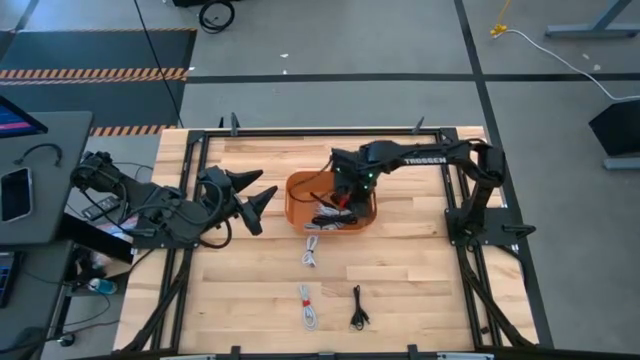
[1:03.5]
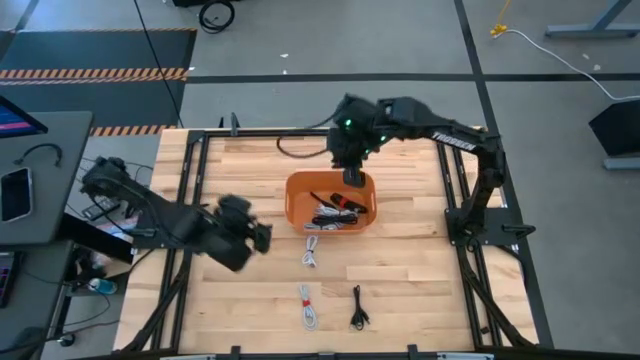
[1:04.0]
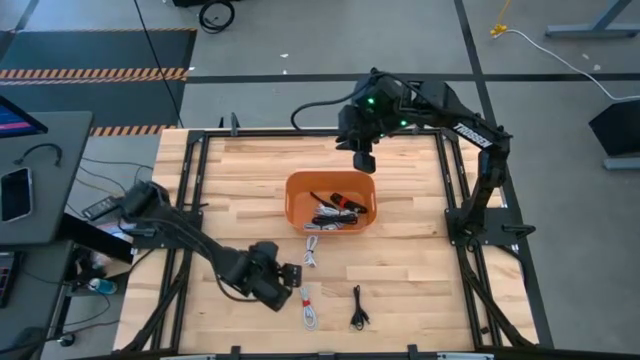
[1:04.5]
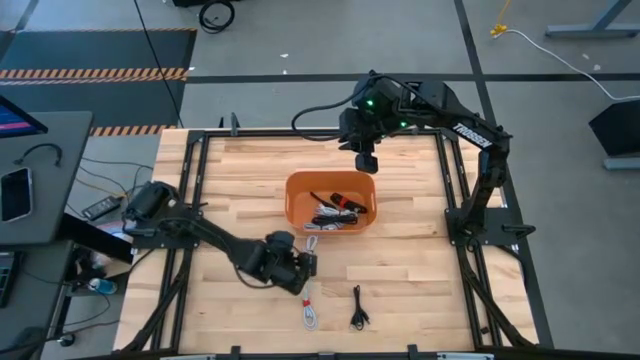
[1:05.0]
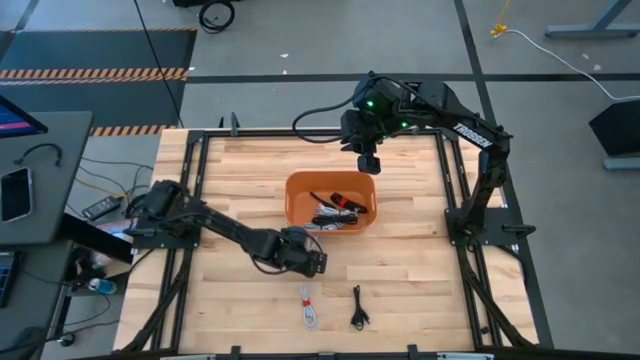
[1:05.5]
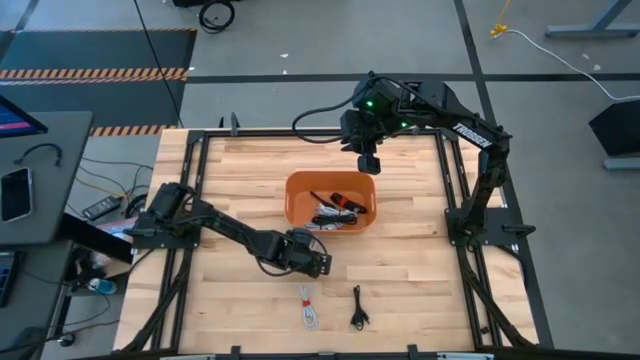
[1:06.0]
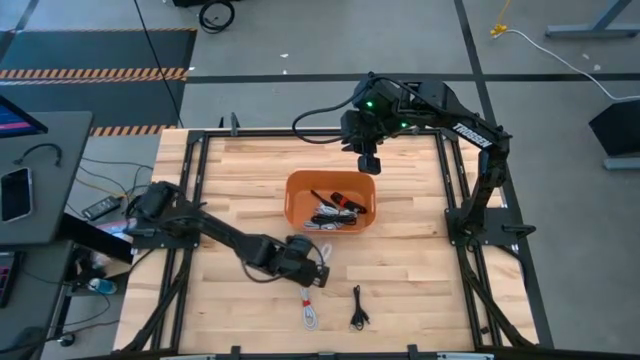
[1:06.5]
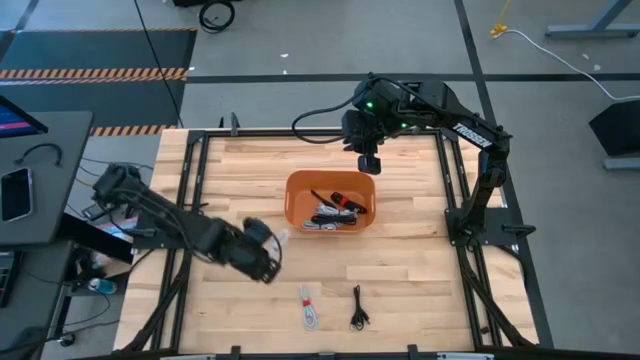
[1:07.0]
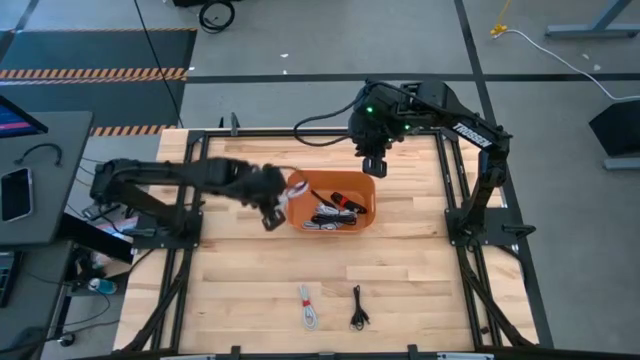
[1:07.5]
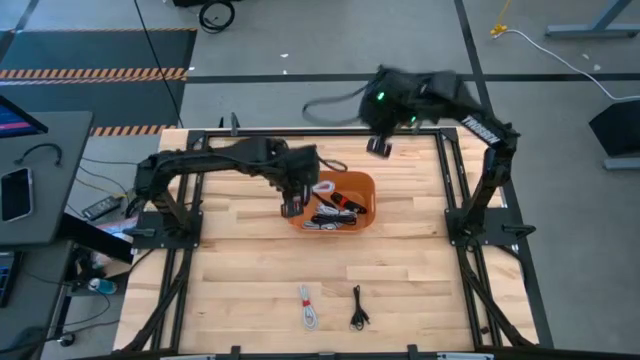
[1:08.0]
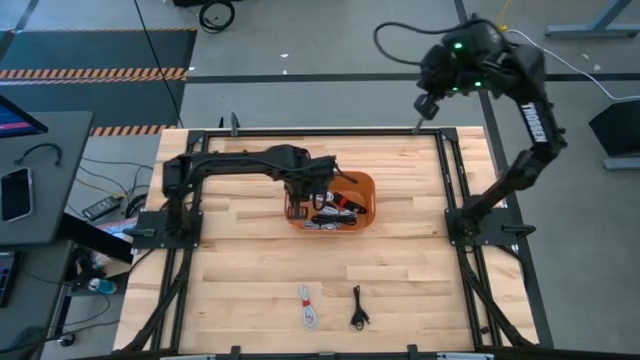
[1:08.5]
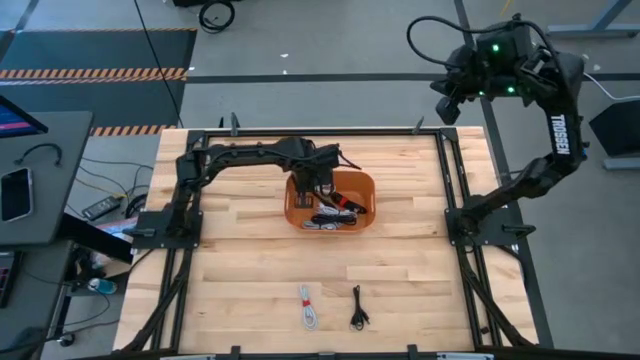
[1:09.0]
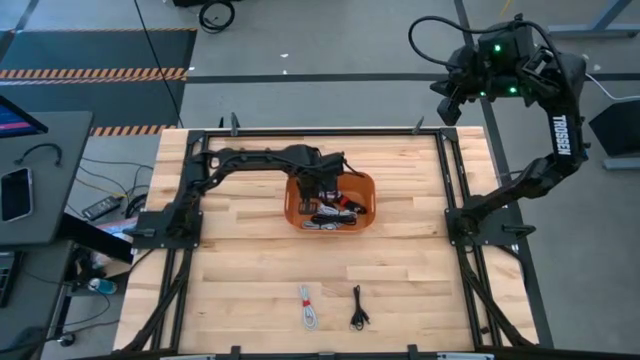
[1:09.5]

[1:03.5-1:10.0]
Task: Pick and place USB-C Cables
Put the white USB cable into the orange bin

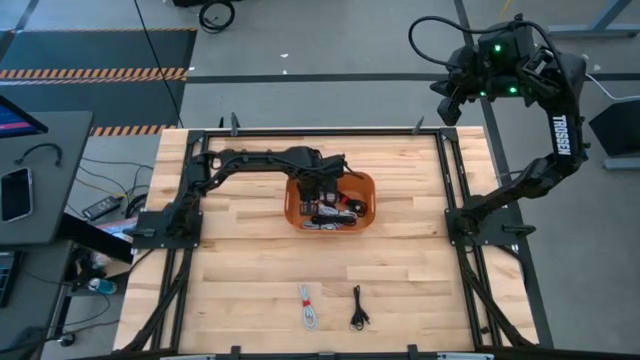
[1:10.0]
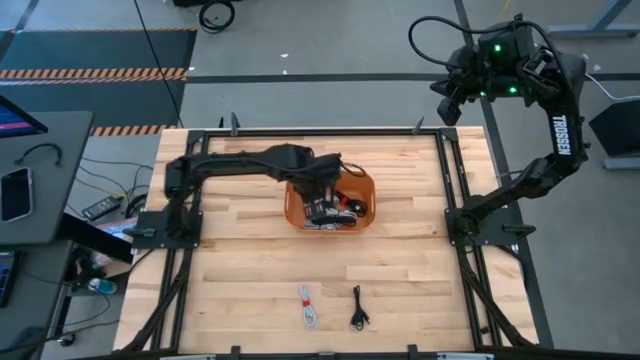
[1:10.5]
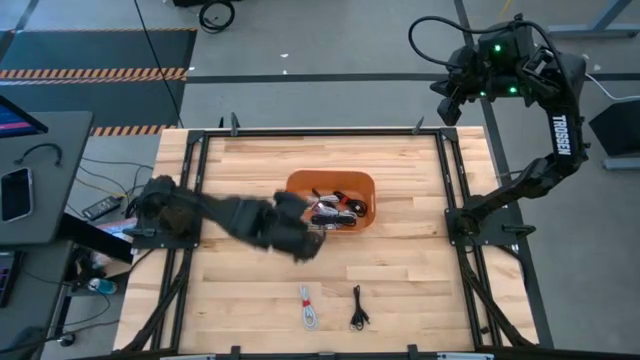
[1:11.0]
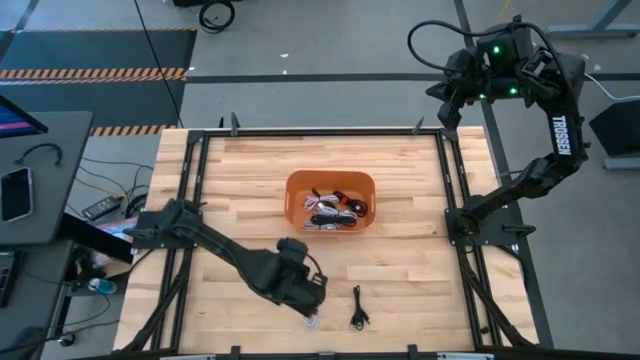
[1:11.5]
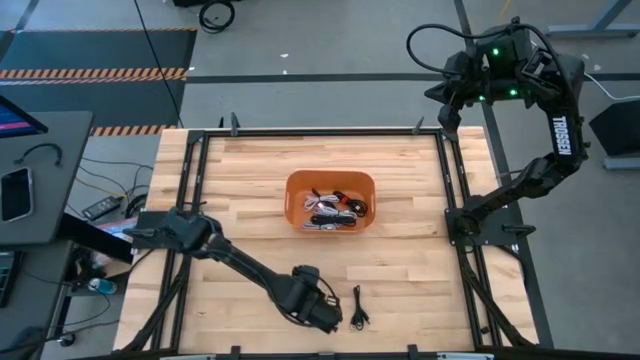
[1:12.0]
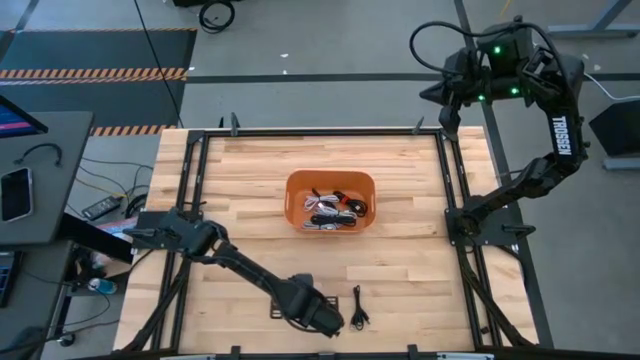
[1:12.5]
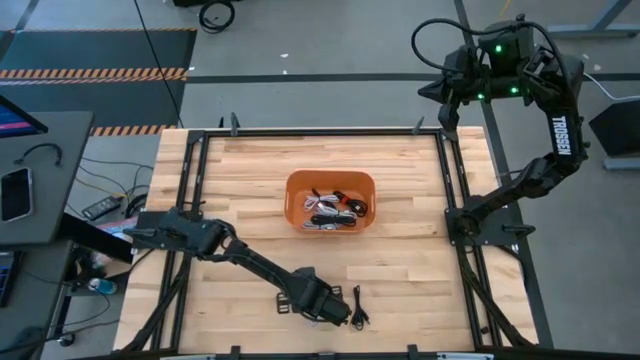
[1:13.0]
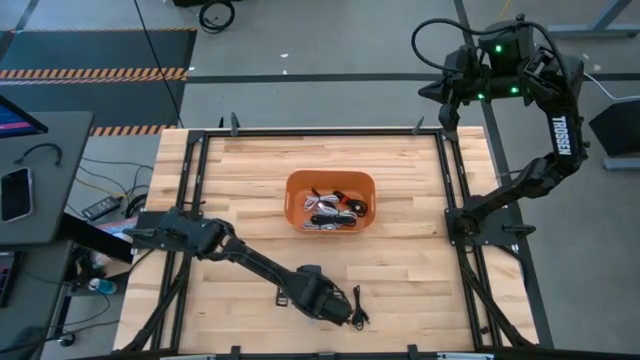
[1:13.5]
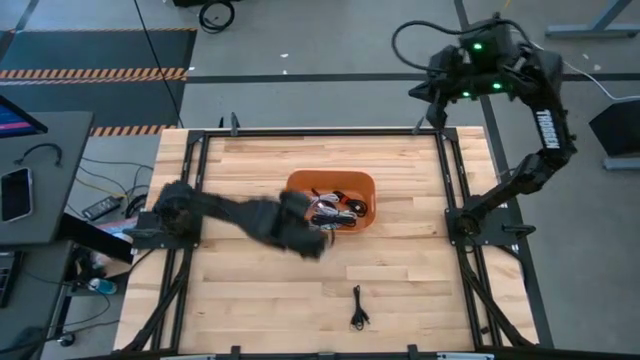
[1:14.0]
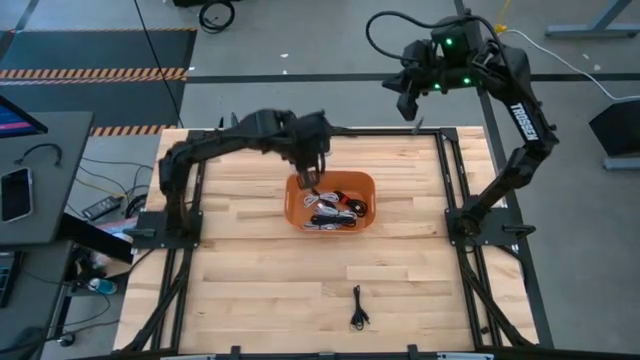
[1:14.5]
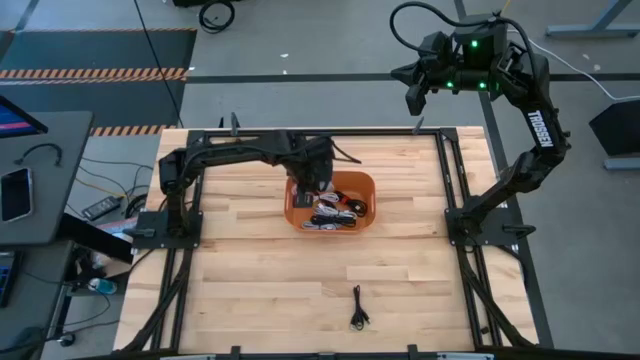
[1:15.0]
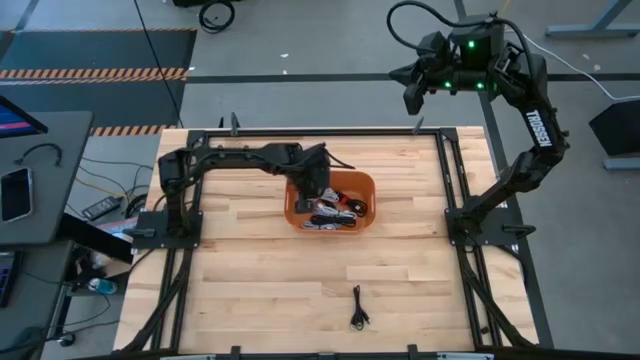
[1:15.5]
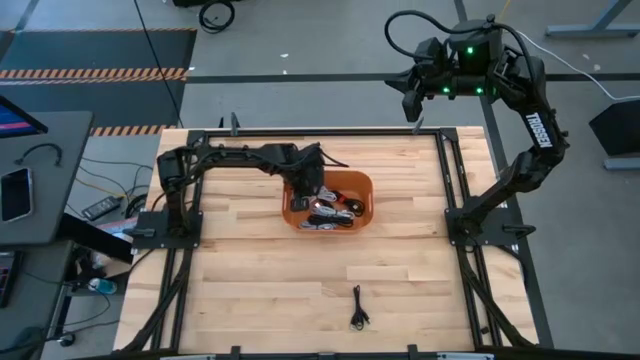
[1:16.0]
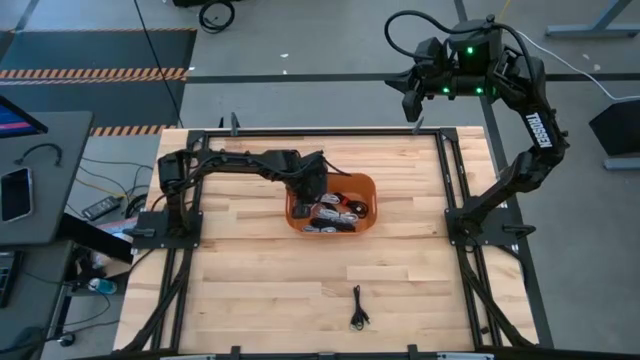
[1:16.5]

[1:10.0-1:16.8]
Put the white USB cable into the orange bin

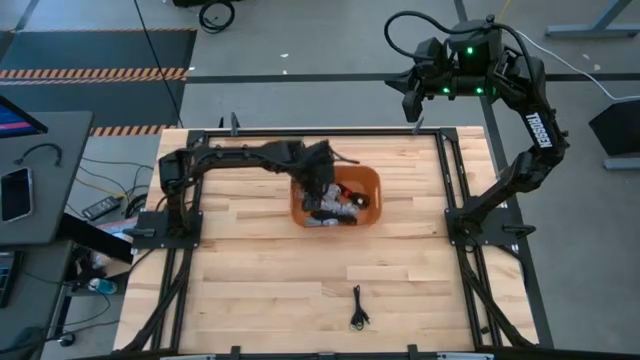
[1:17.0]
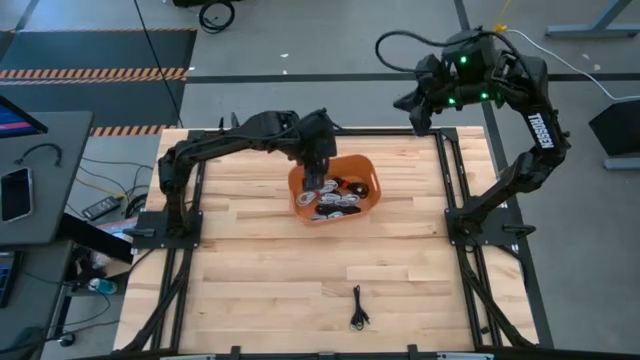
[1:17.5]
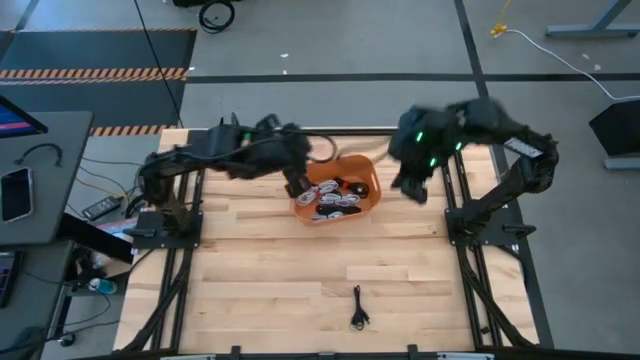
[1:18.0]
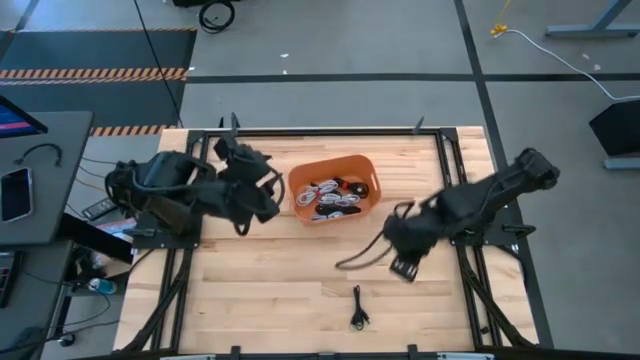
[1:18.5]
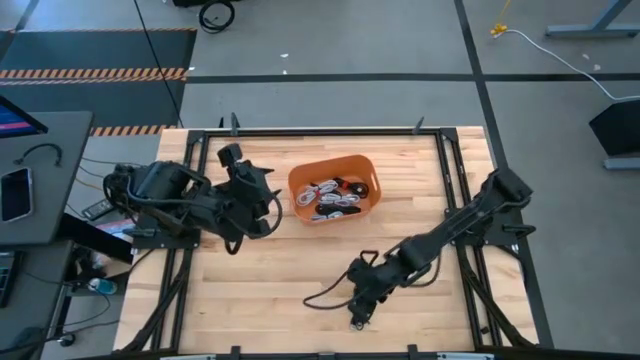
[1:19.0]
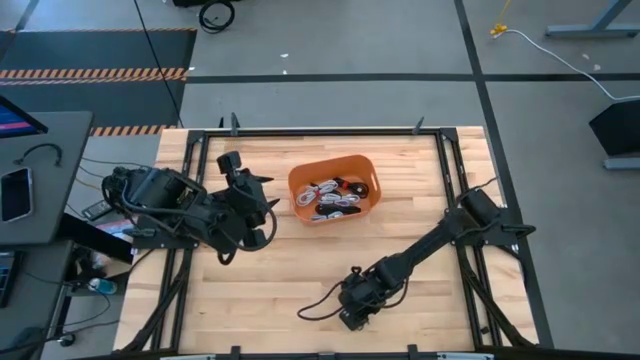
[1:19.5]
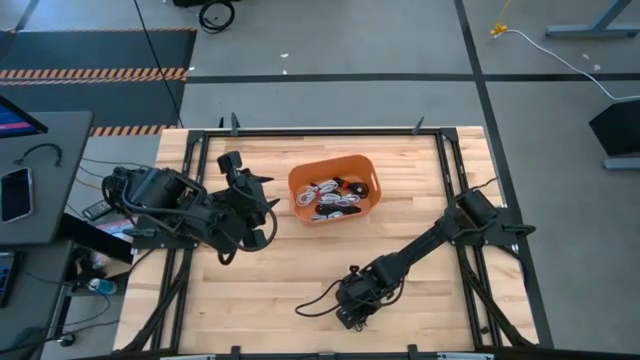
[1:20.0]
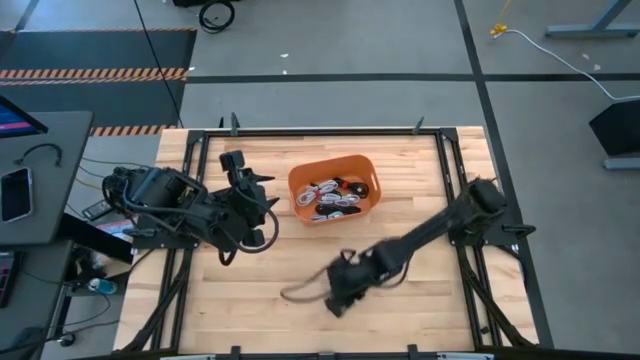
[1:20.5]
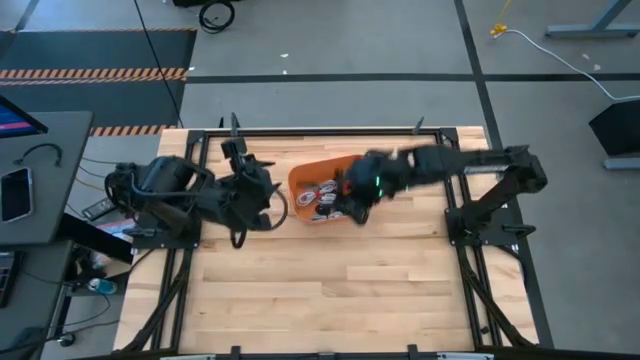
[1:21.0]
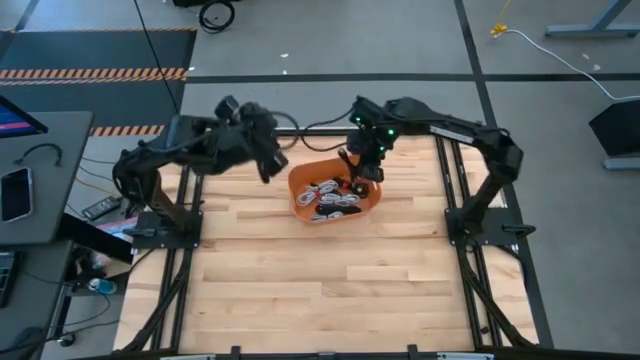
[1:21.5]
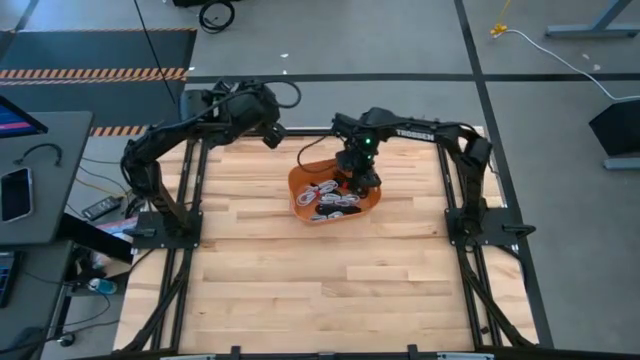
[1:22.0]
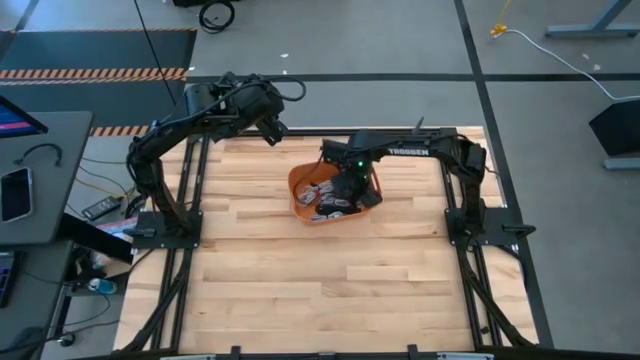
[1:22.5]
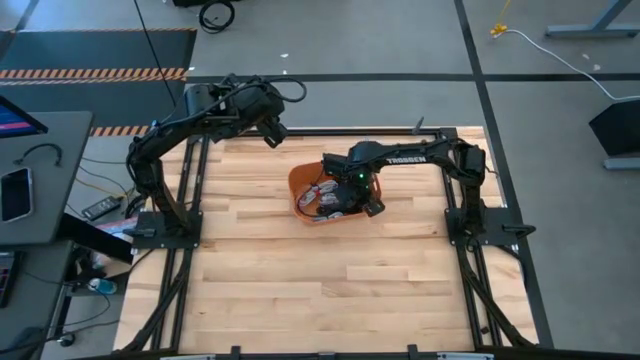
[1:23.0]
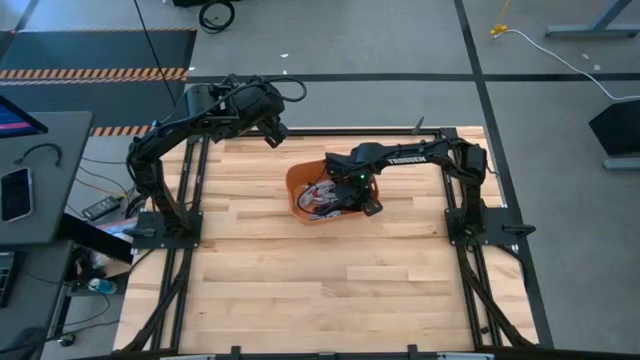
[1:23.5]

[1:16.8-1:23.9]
Put the black USB cable into the orange bin

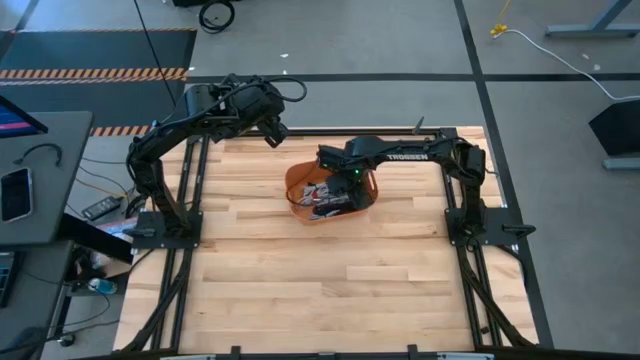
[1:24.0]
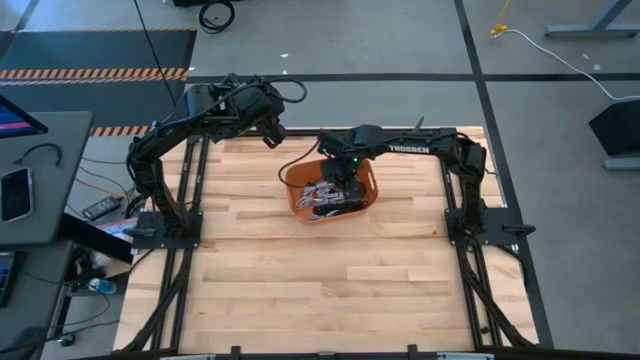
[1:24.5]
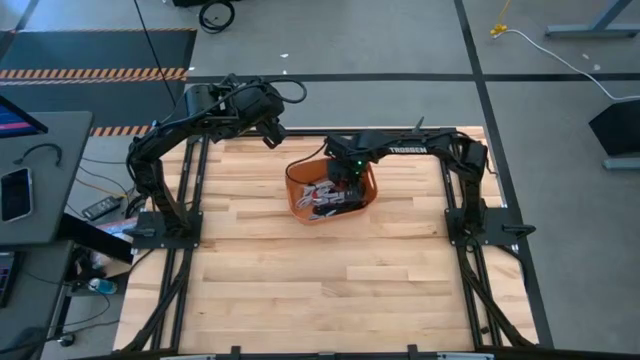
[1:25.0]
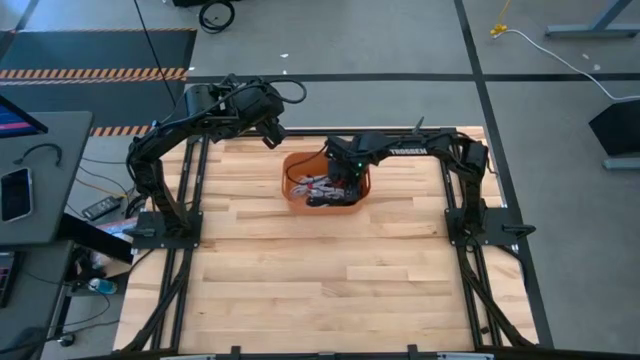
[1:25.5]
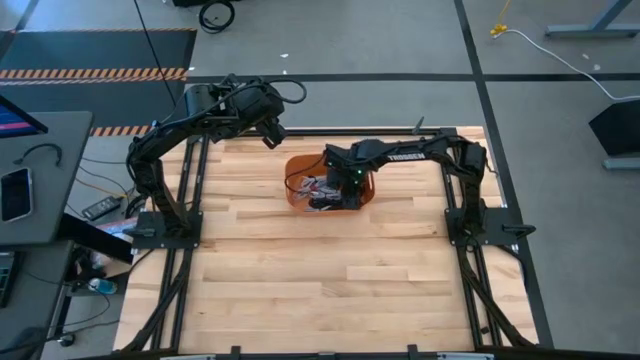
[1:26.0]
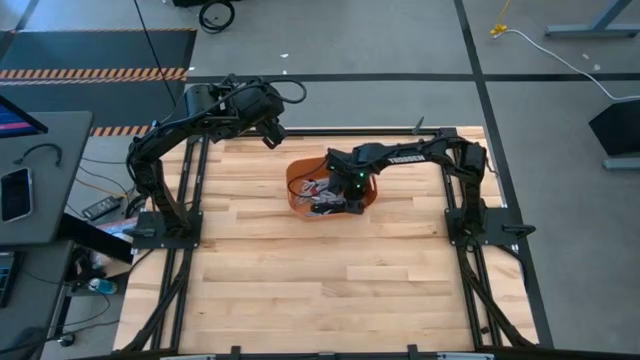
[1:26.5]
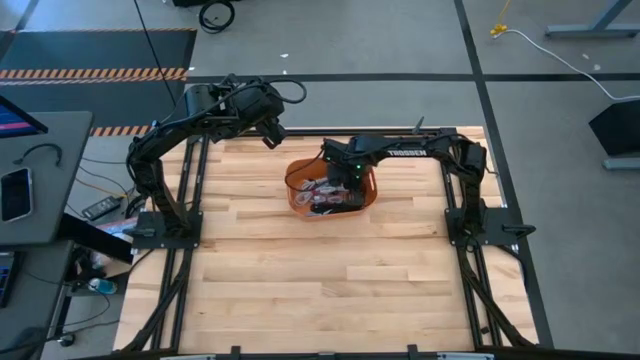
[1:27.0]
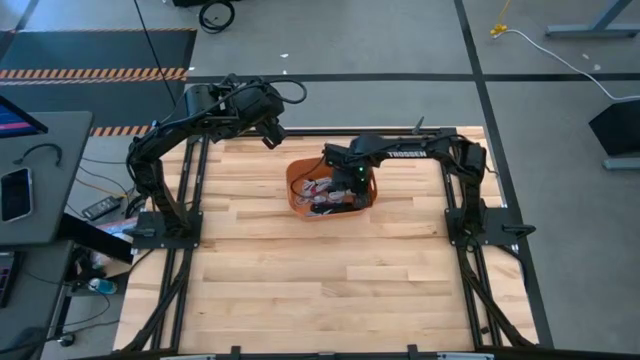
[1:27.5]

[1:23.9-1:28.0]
Adjust the white USB cable in the orange bin
